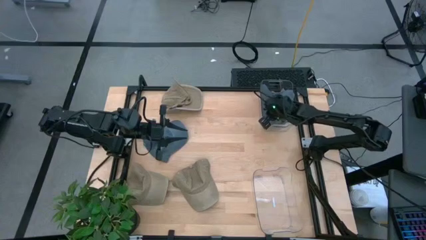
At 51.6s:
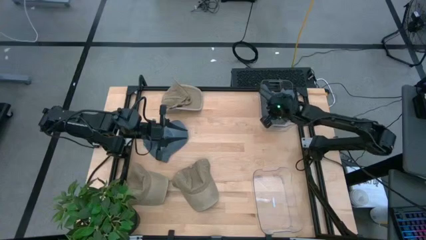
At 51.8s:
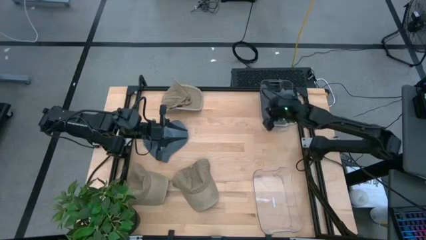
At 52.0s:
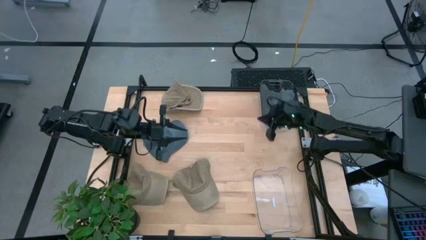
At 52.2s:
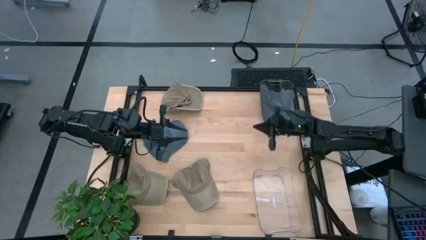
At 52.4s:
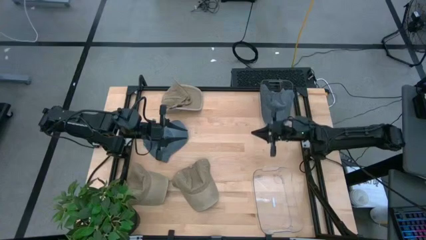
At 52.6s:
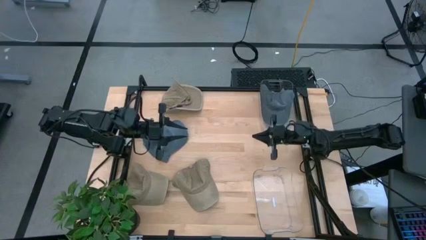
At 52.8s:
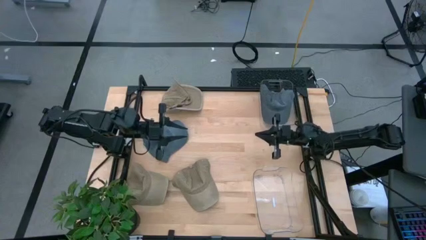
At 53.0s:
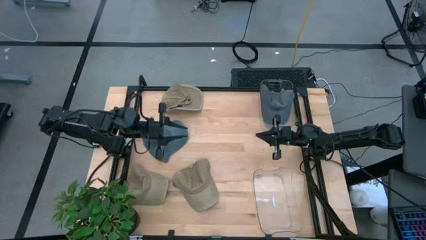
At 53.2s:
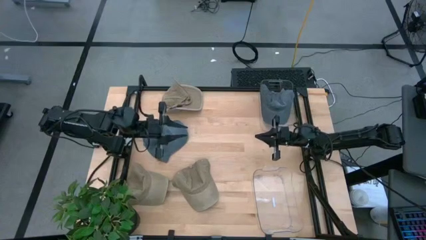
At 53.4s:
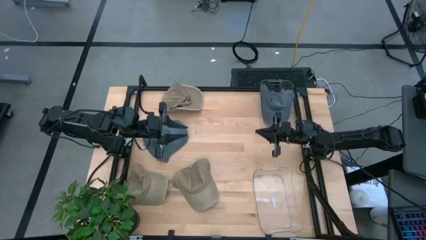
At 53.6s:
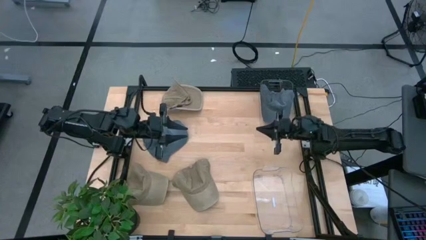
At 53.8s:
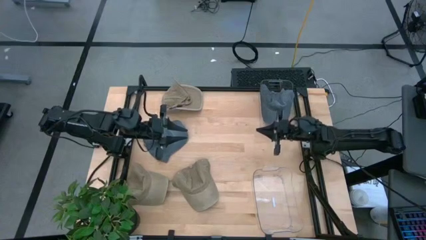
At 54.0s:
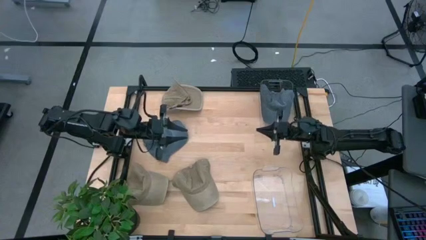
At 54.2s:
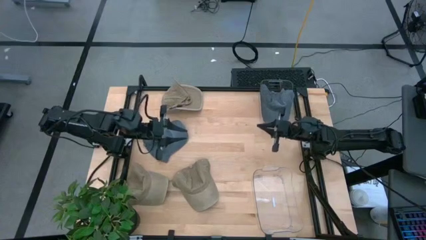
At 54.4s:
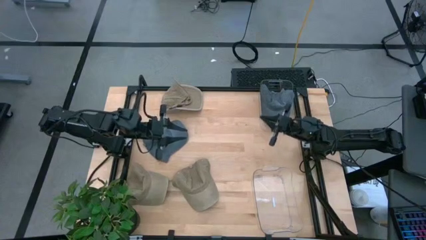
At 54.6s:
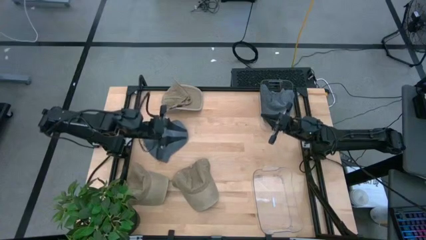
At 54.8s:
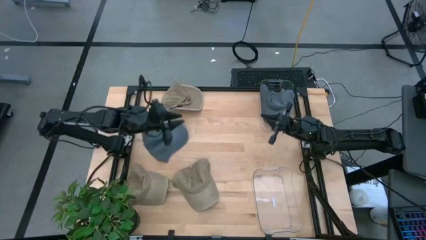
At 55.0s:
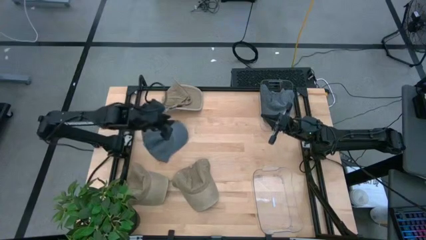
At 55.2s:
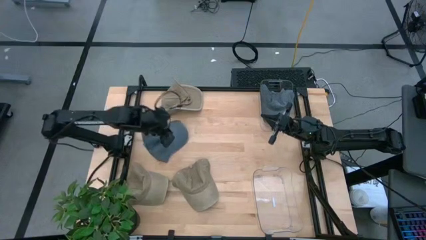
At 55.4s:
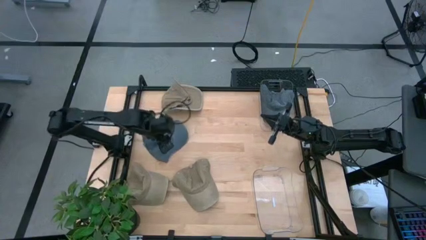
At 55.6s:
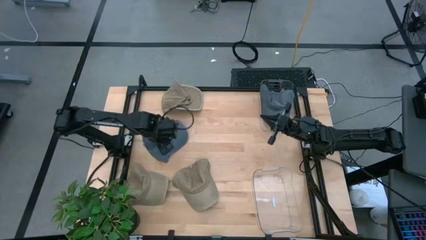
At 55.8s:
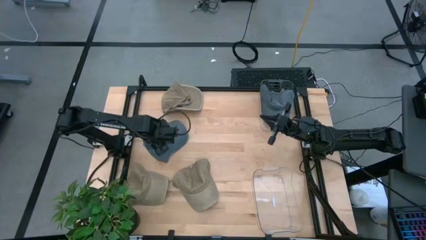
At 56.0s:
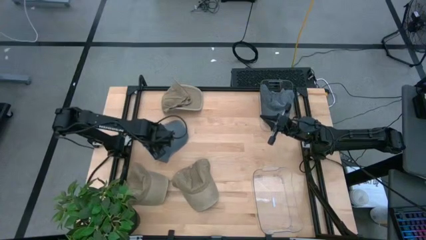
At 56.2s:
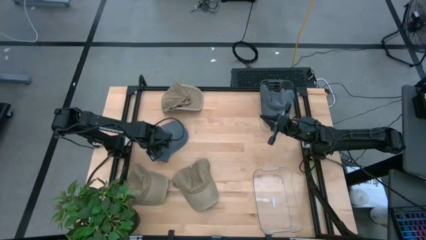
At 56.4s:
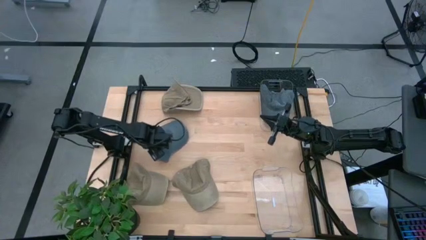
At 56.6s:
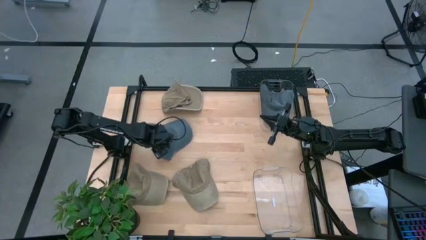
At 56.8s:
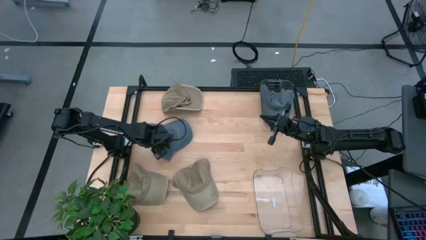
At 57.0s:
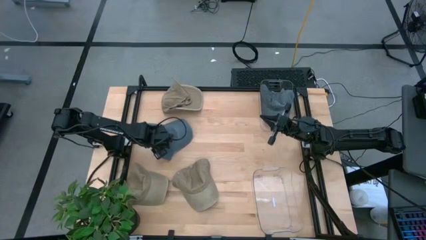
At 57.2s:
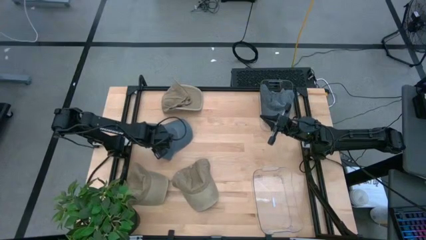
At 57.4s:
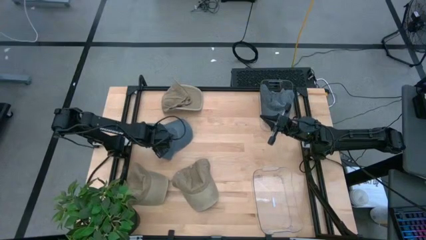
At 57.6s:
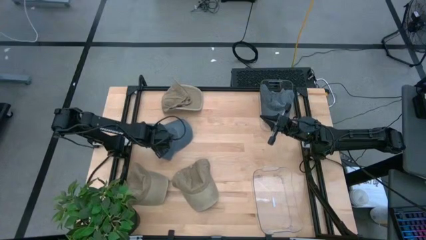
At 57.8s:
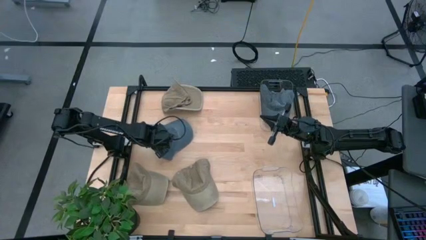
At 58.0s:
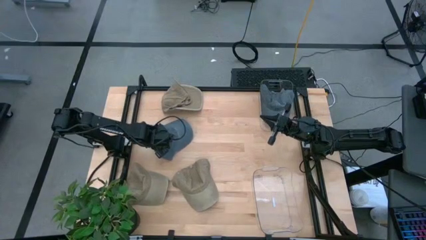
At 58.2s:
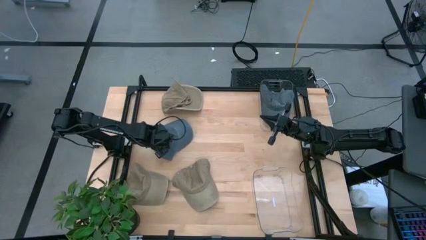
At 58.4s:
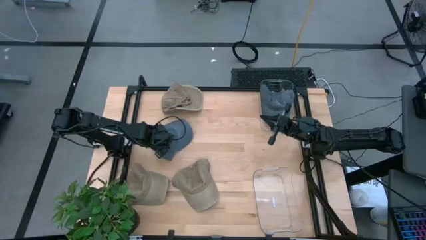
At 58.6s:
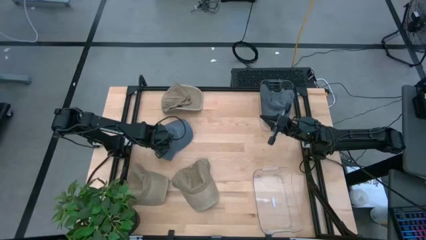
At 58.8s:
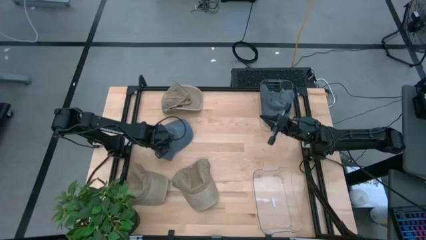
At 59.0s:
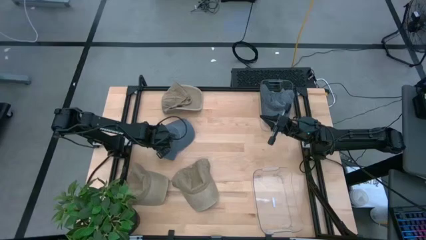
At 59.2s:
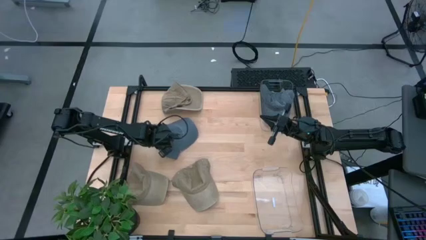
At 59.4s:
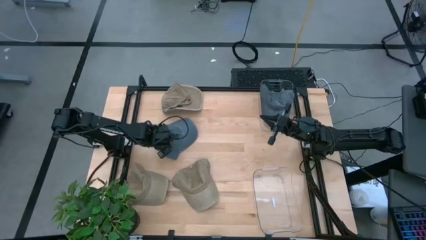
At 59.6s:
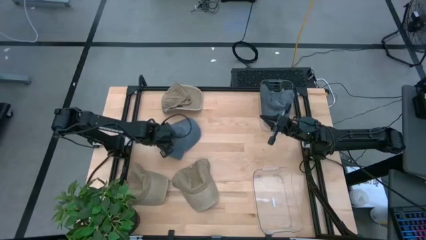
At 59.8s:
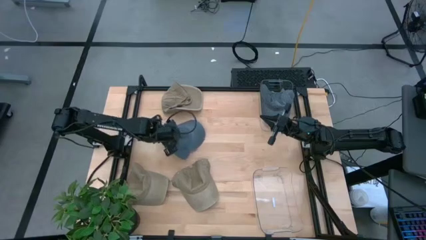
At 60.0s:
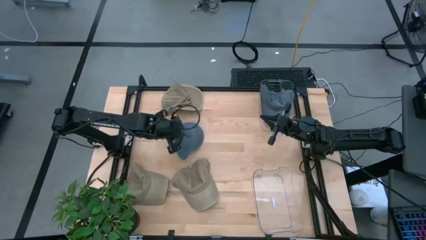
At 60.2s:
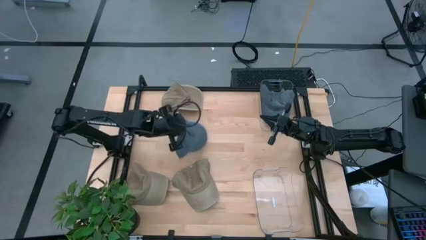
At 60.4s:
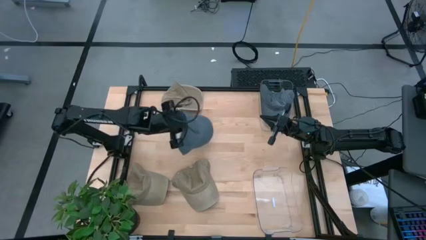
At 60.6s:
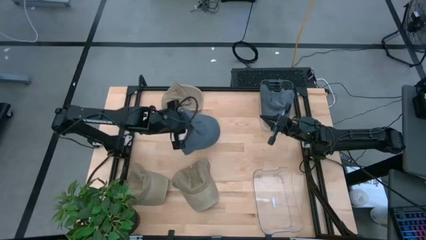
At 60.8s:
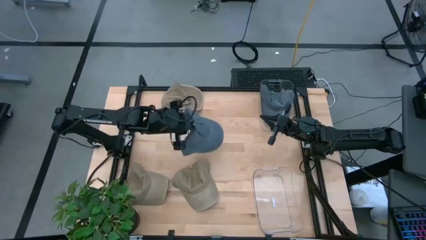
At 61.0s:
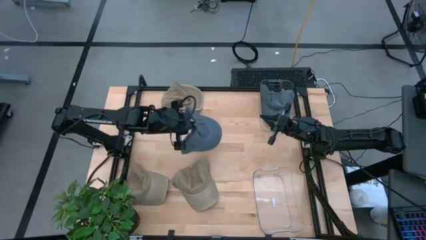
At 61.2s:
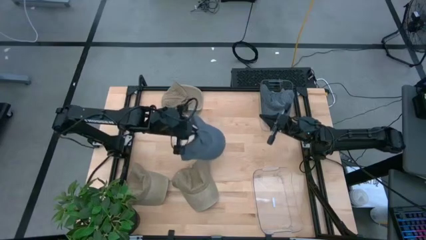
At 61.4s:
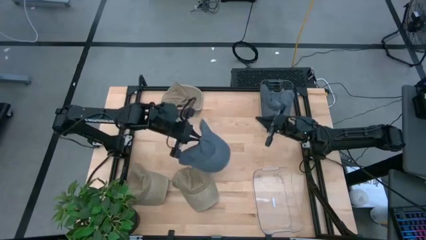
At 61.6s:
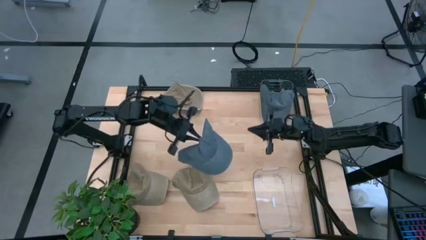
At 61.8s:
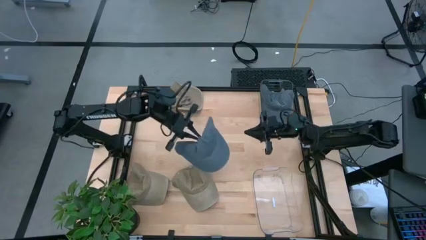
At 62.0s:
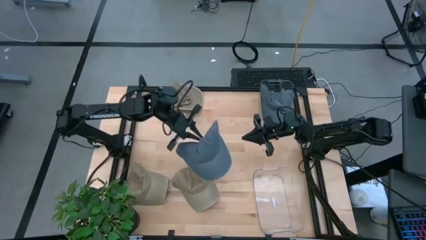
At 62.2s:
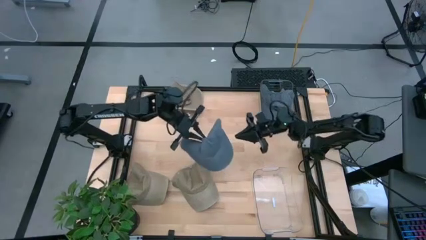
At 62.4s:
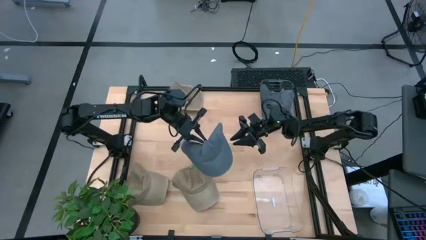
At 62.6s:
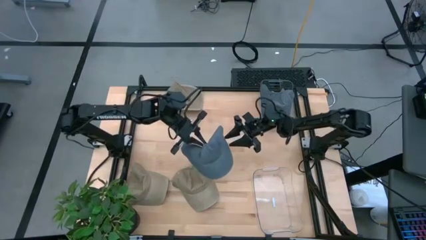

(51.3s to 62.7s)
Task: Pick & Place hat
Put the blue cap into the top transparent bin

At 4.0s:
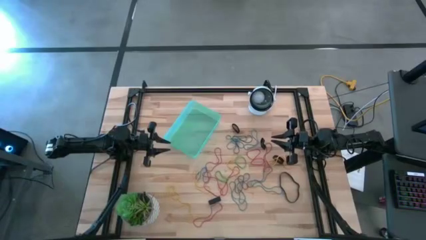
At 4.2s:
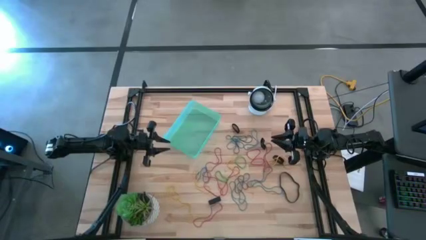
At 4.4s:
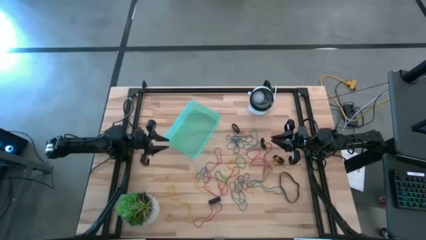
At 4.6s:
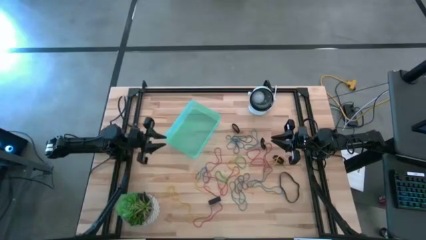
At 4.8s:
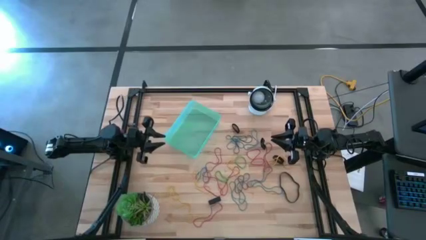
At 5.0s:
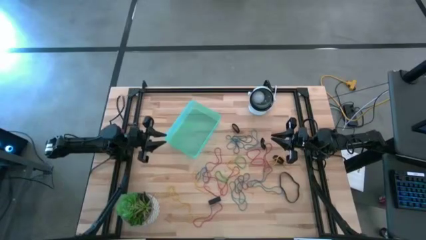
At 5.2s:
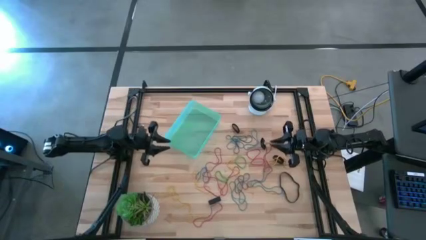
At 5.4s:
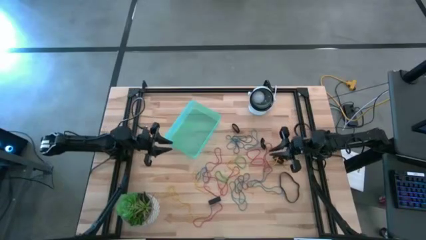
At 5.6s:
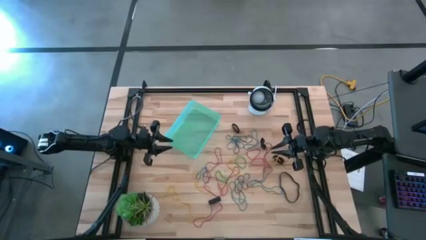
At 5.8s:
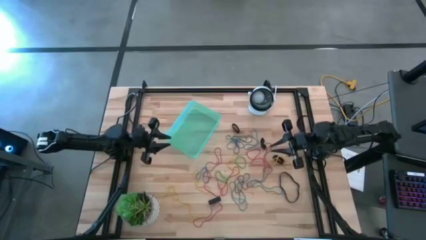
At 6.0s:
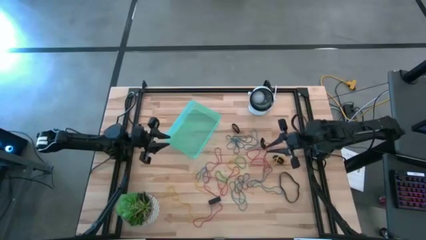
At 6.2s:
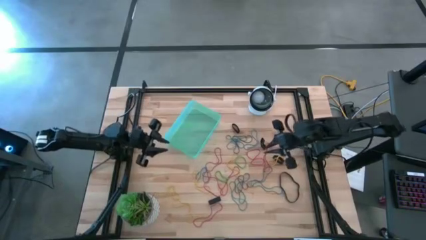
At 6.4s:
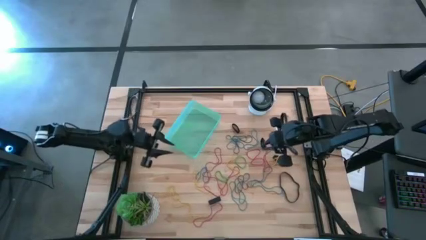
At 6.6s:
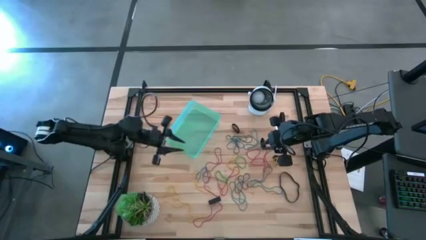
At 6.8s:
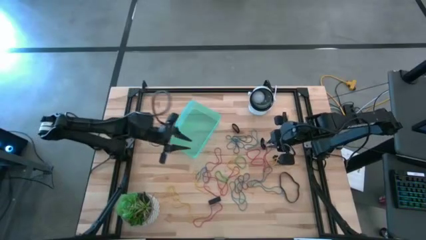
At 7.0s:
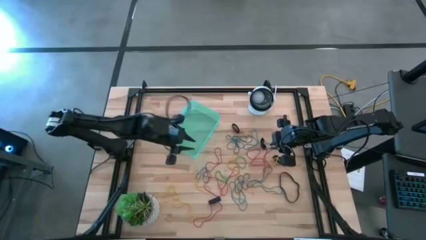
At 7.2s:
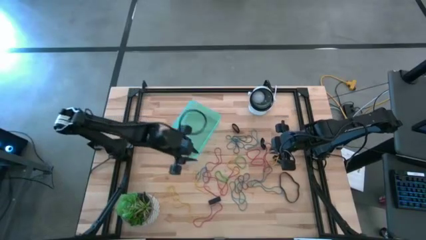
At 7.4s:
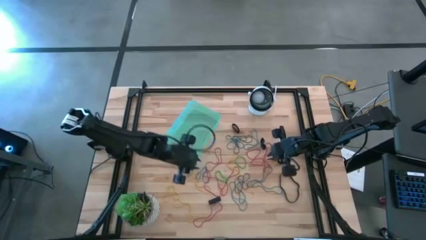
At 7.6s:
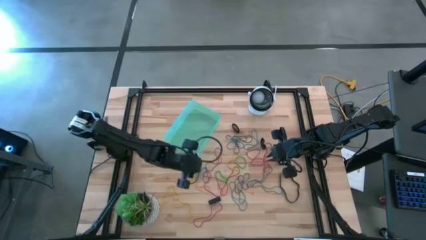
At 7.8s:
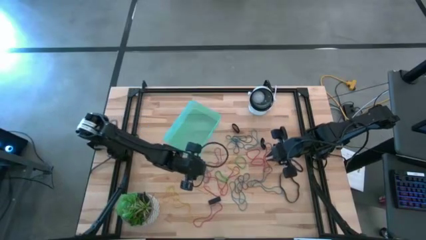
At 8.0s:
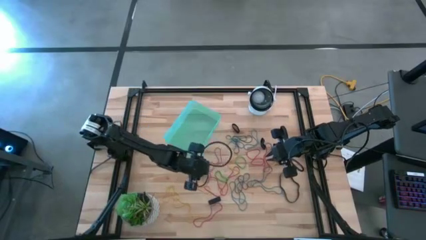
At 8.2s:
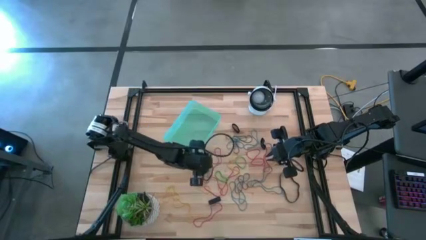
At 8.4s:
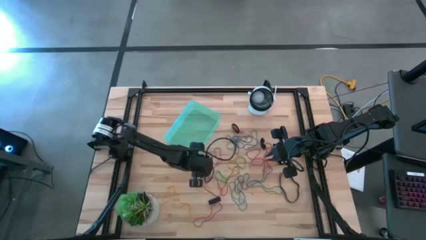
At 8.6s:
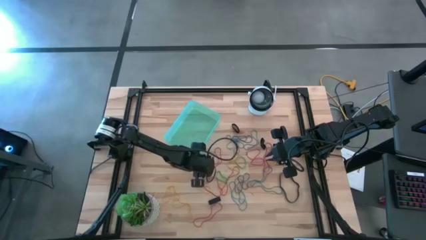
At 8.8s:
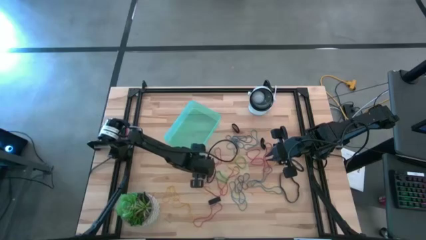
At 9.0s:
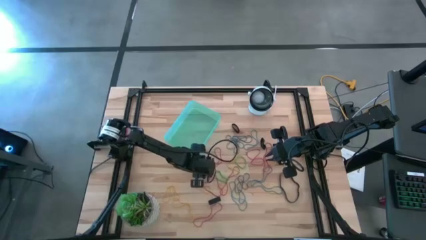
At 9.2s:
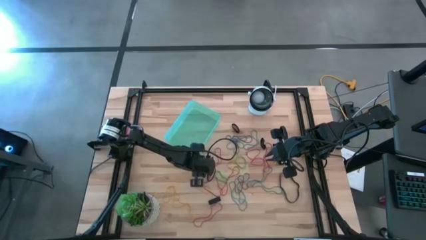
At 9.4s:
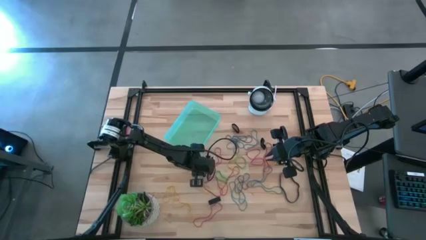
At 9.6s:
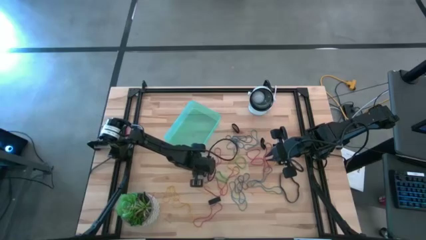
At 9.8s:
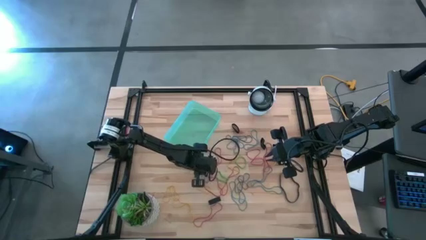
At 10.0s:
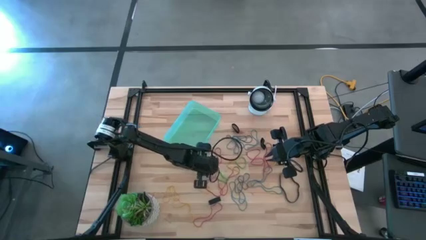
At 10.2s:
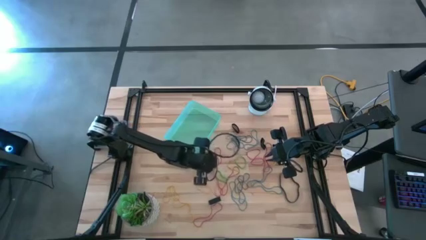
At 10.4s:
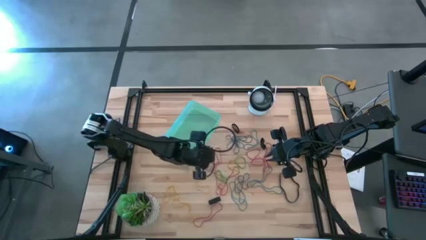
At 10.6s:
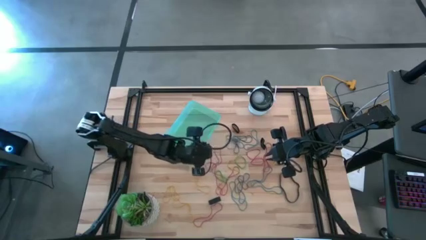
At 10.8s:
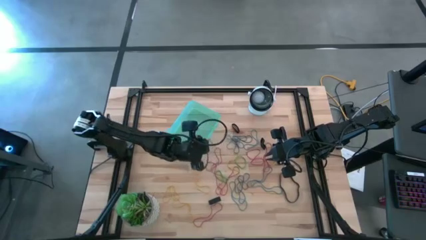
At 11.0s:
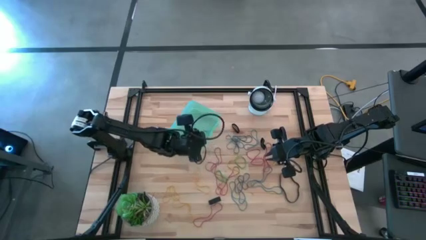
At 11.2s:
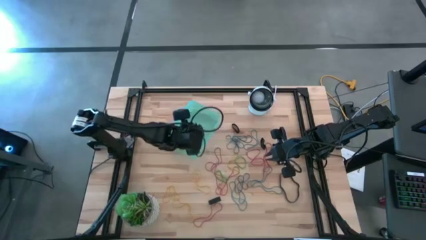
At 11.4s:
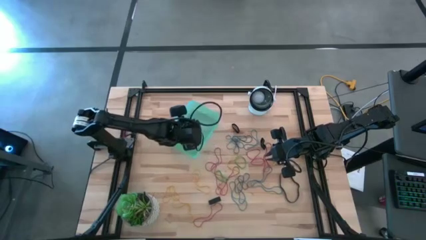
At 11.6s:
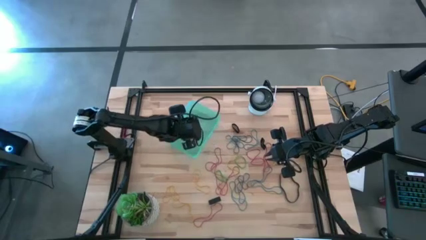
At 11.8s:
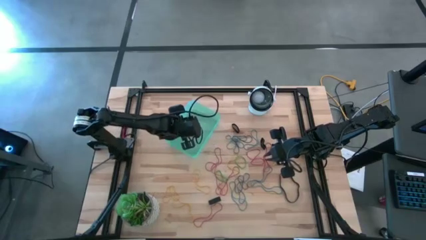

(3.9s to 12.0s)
Task: Pick and place rubber bands into bin
Put the blue rubber band into the green bin
